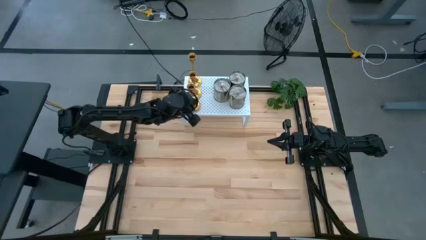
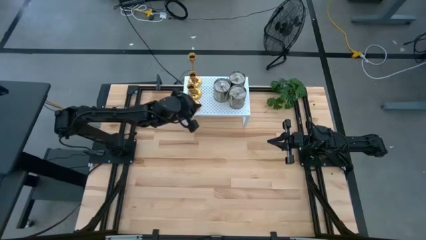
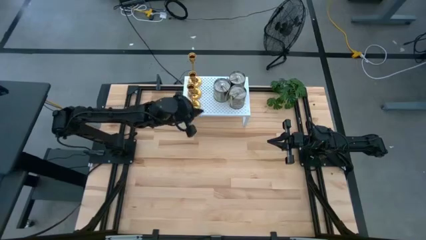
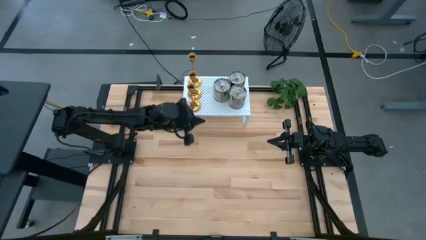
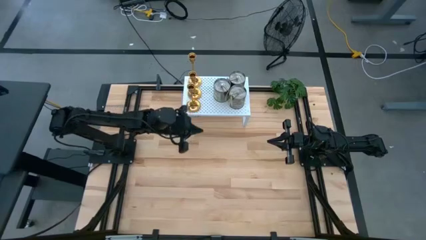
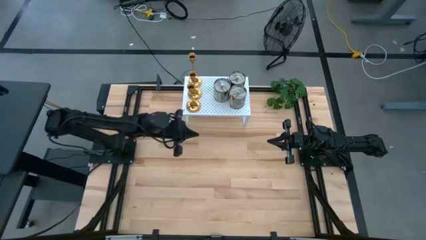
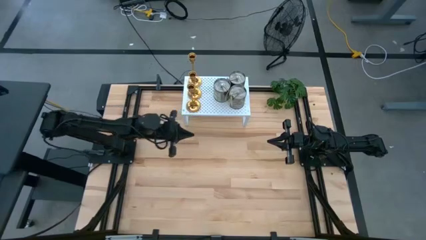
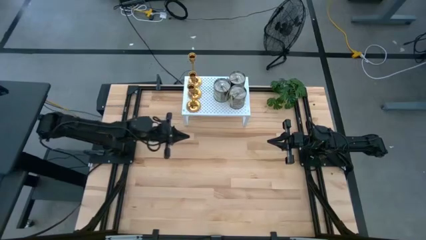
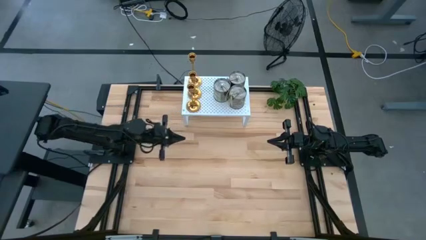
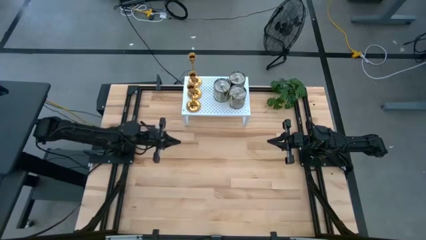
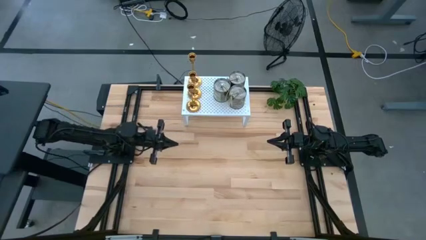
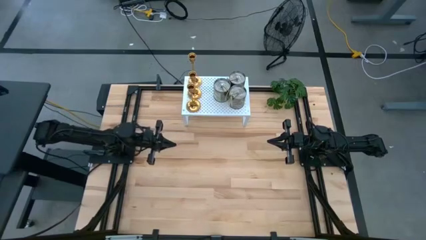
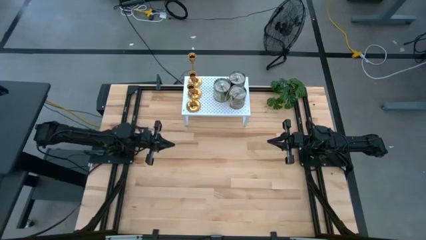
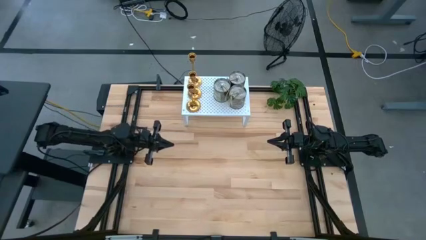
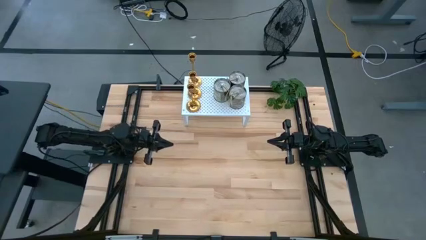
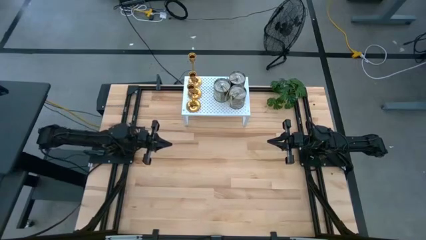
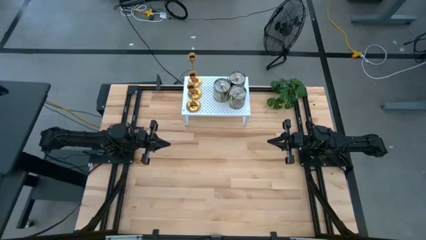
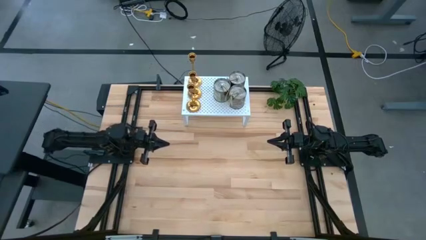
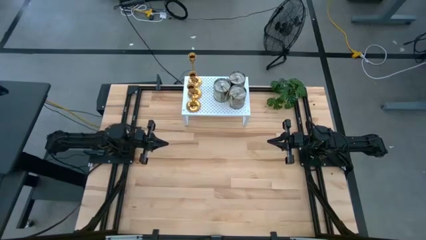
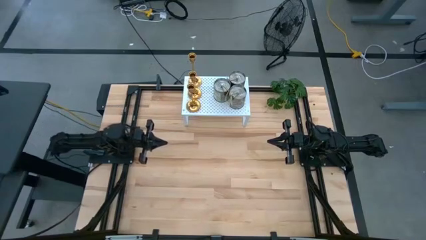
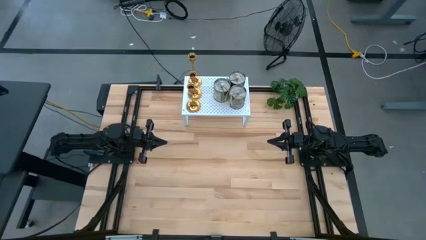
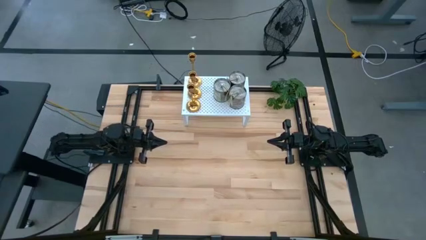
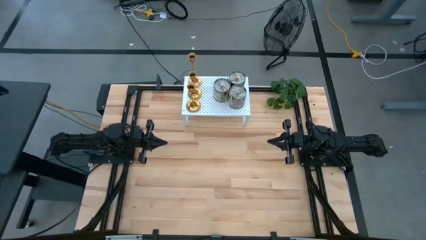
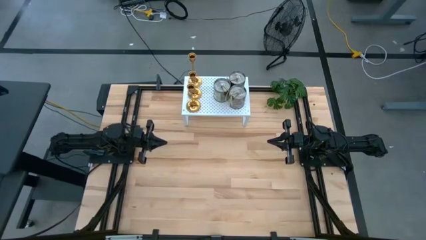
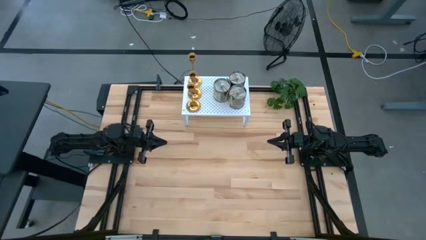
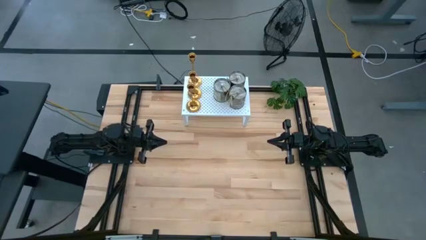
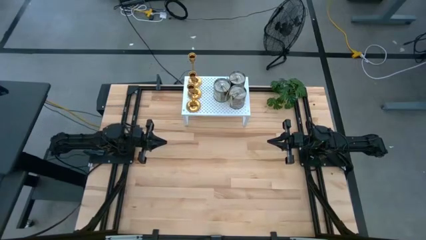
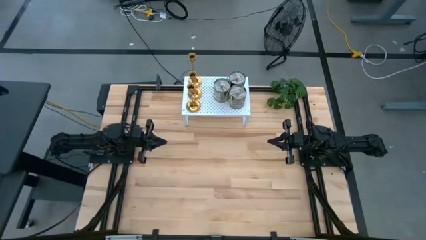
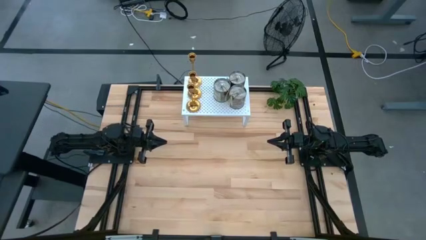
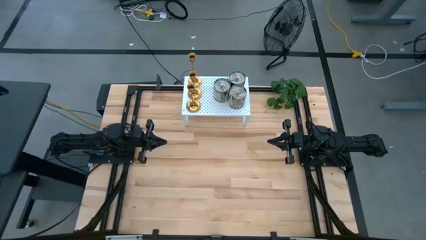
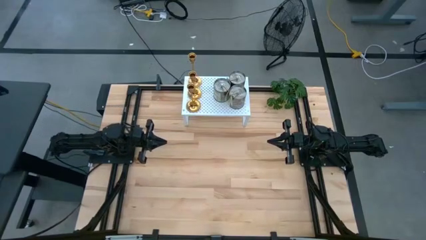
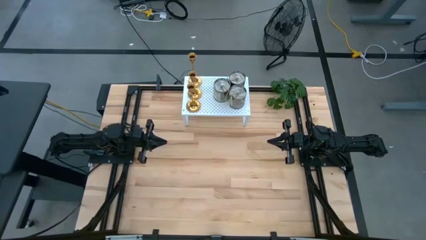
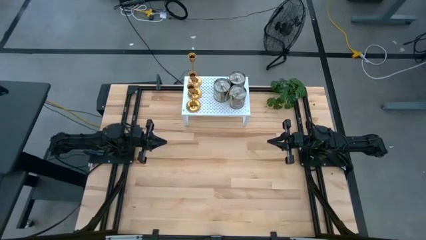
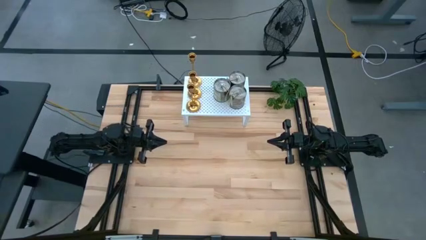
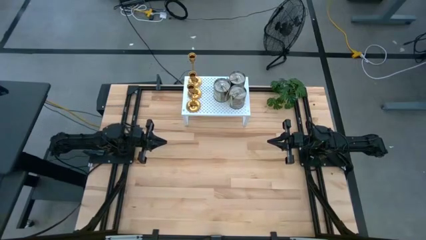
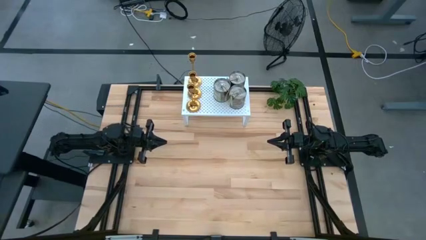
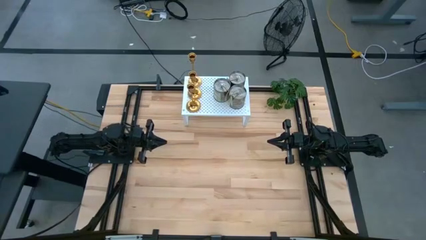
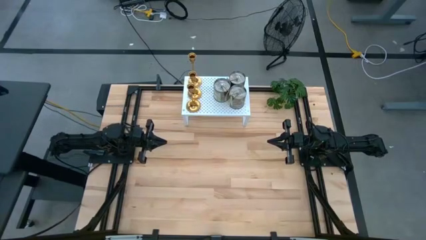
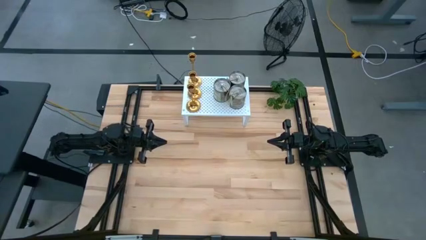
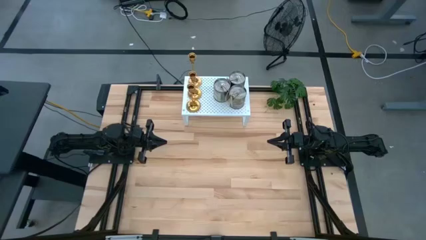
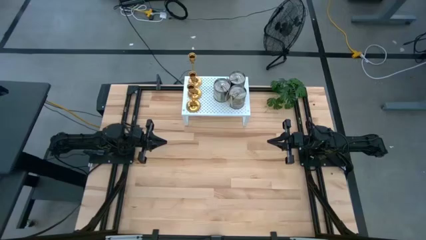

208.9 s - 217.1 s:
Task: Pick & Place candle stick holders
Return to Home Position

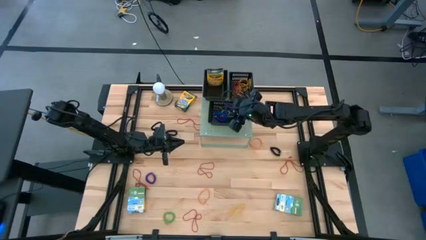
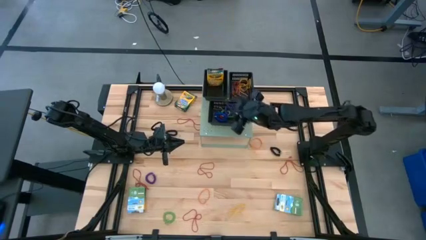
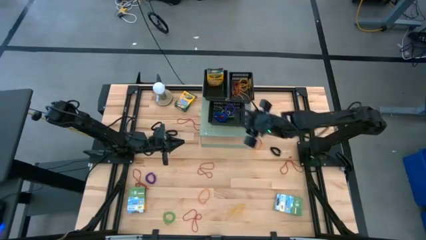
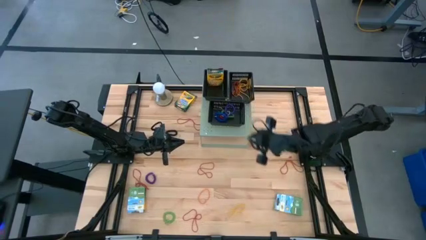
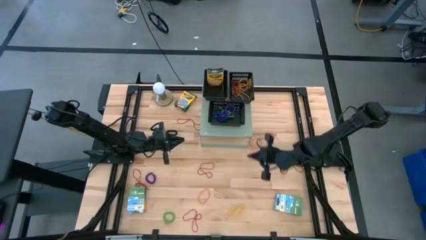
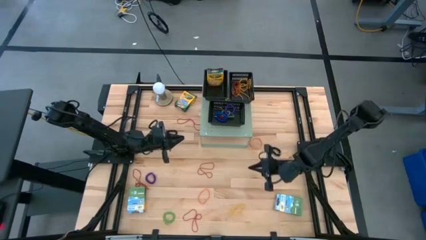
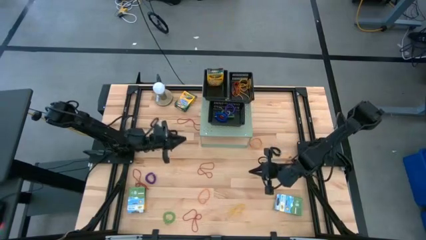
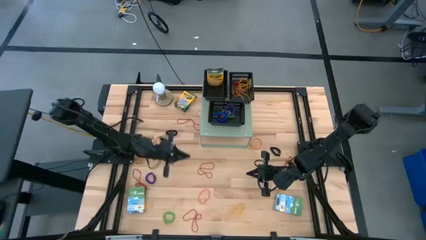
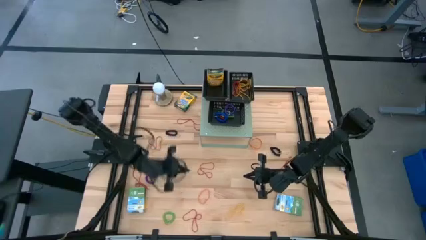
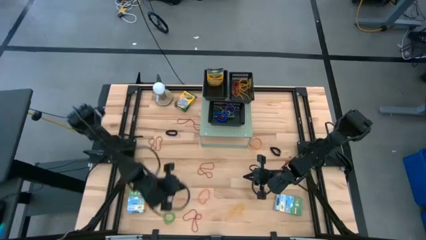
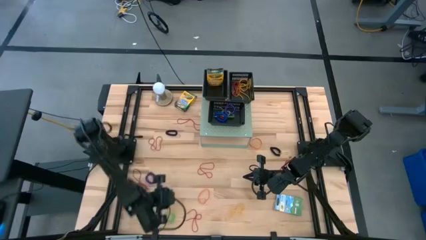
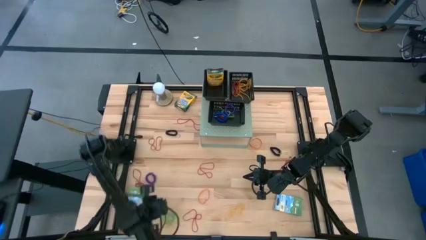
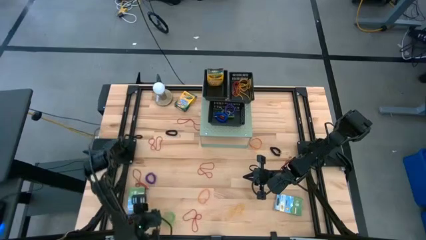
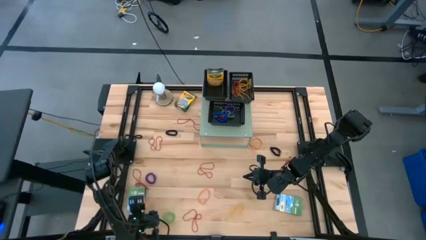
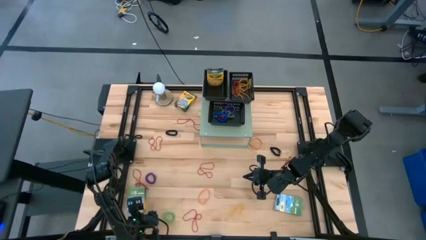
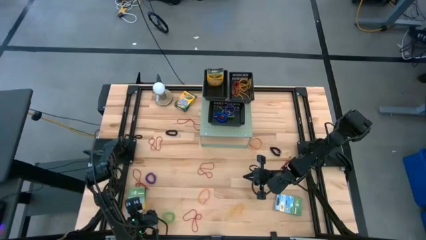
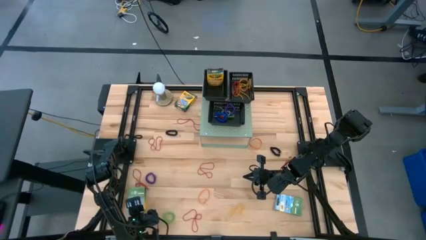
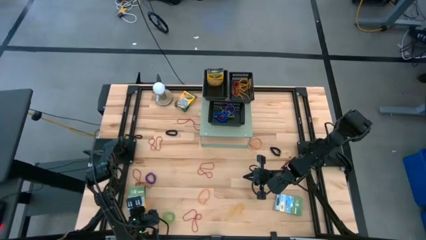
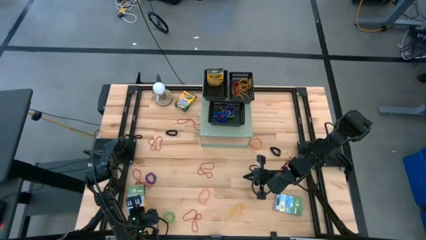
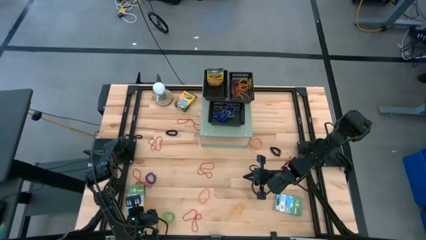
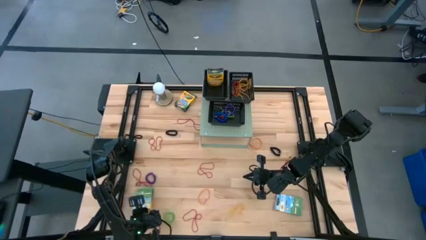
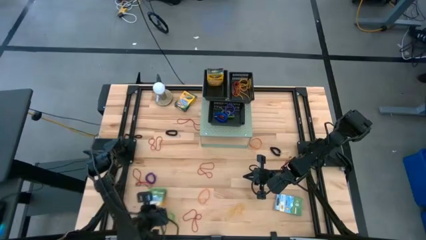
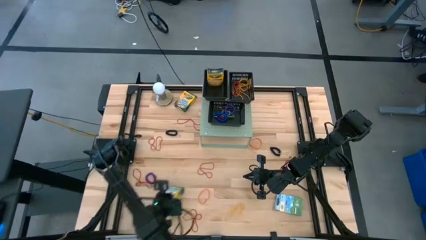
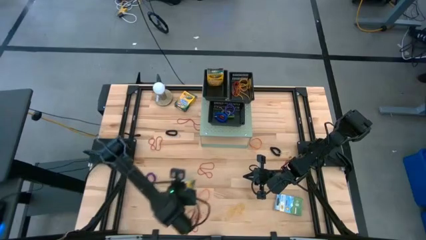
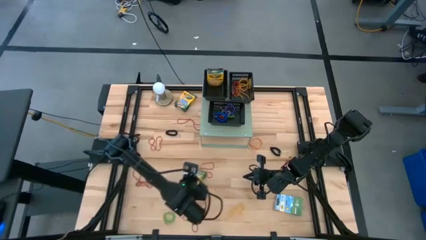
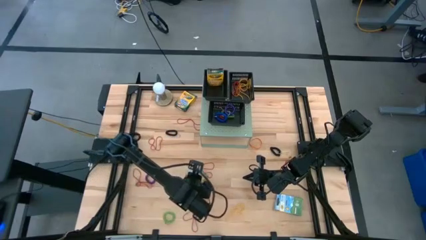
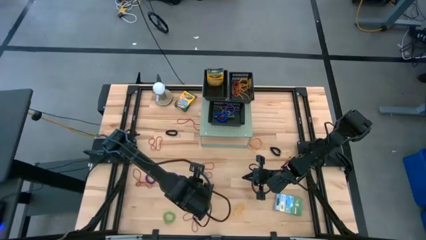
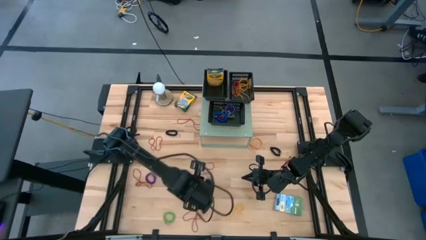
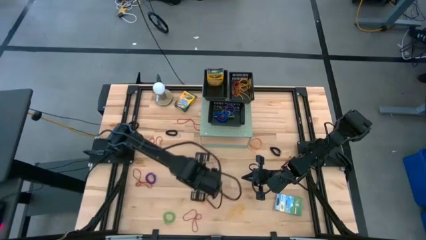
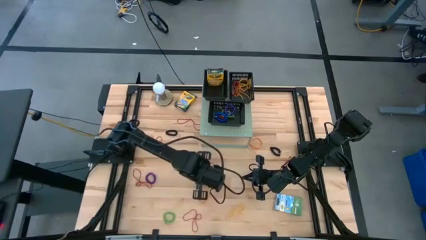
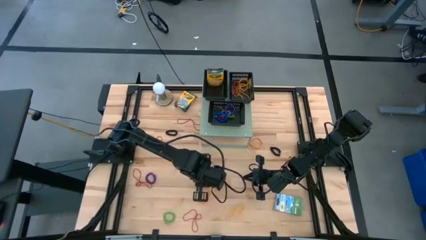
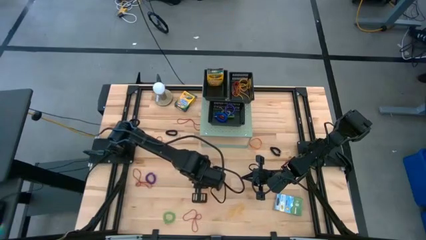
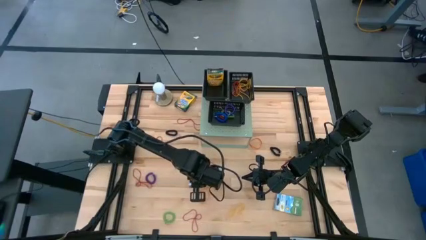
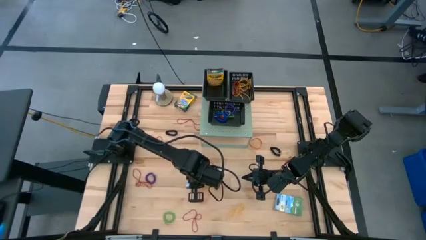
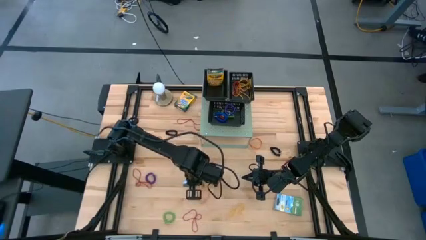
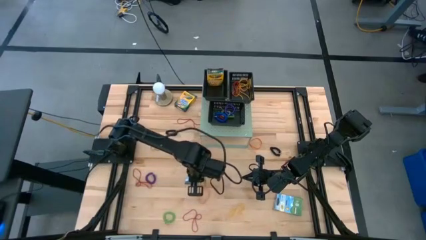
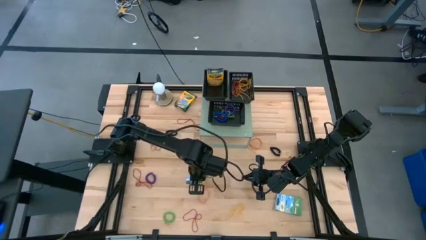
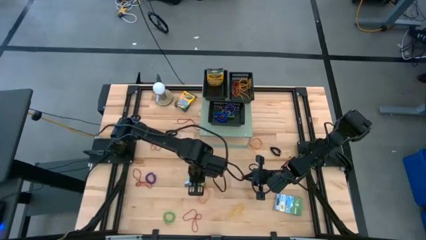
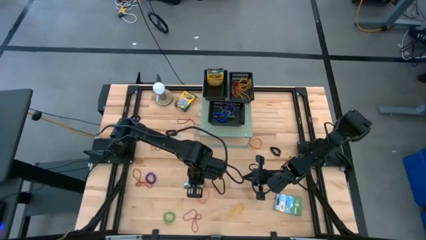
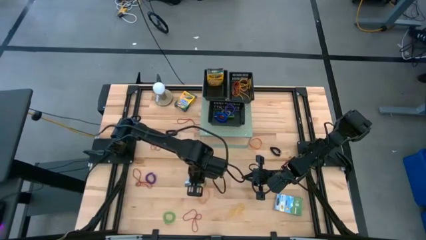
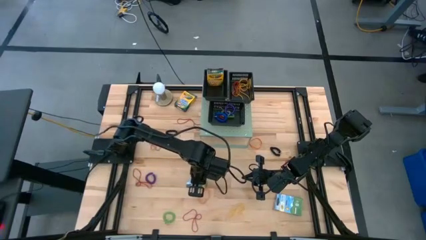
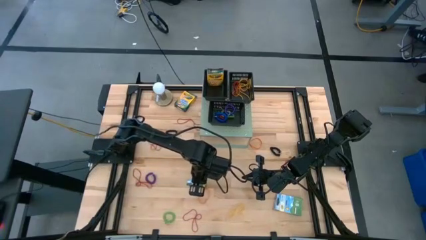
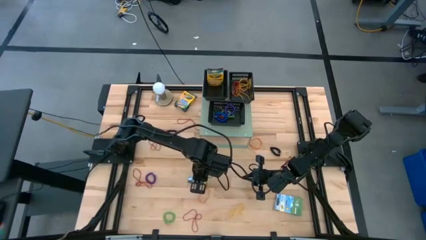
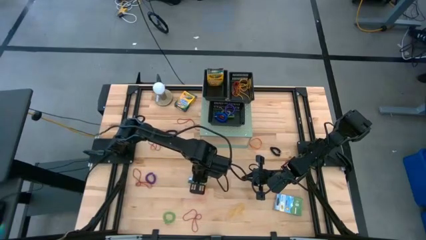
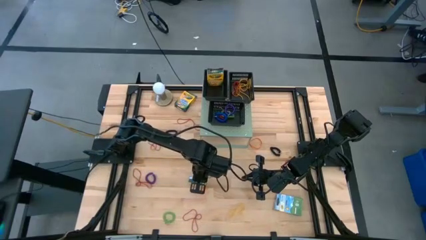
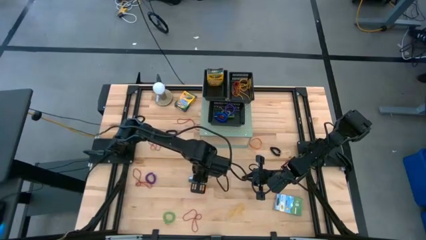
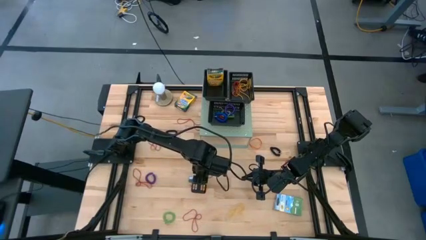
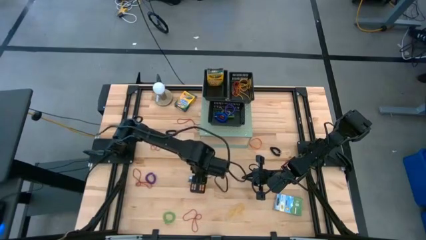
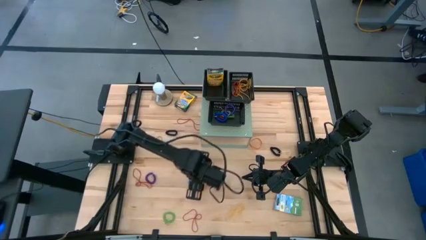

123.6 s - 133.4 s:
Task: Pick & Place Office Desk Supplies
Put the yellow crayon box into the top left black bin on the shelf
